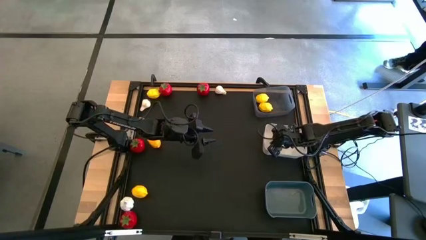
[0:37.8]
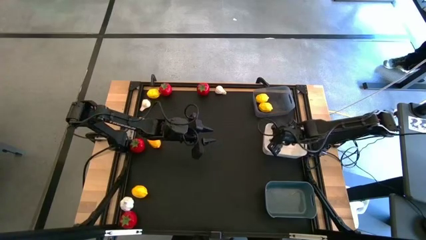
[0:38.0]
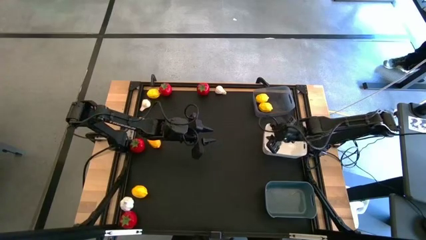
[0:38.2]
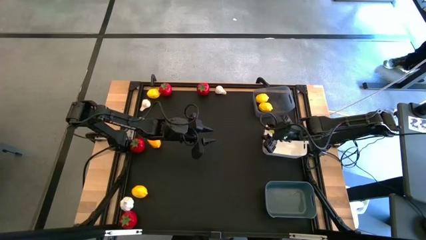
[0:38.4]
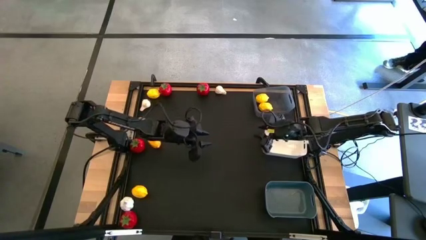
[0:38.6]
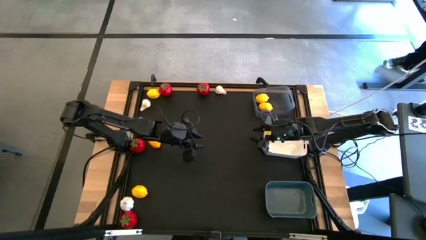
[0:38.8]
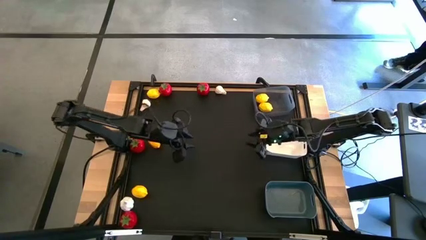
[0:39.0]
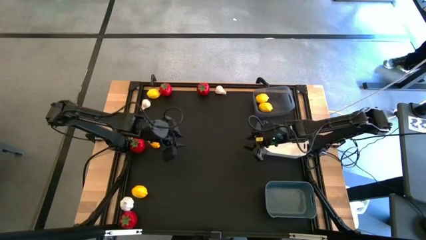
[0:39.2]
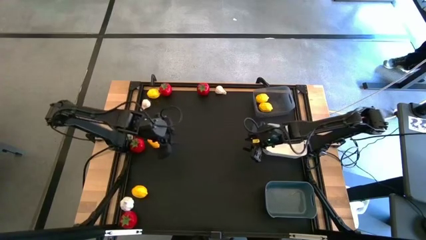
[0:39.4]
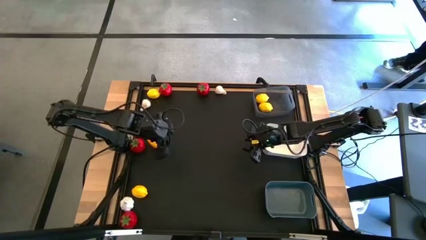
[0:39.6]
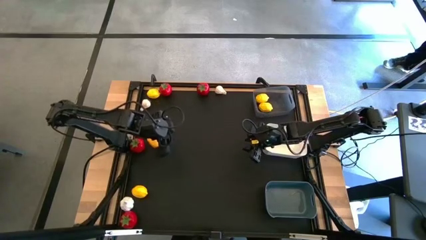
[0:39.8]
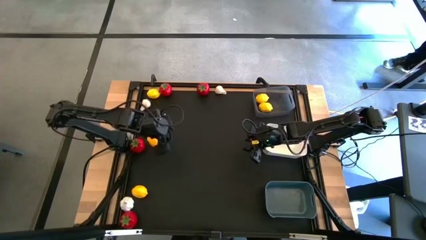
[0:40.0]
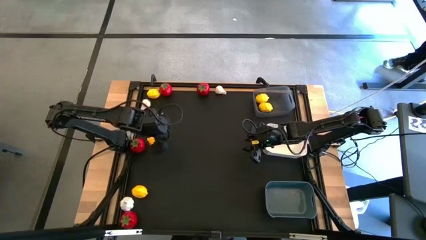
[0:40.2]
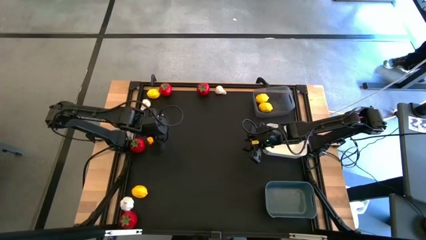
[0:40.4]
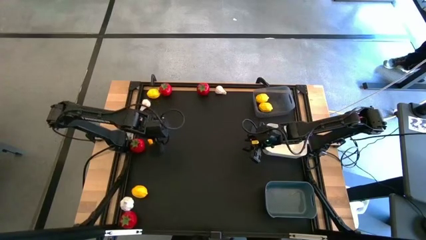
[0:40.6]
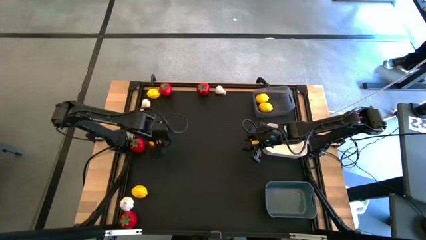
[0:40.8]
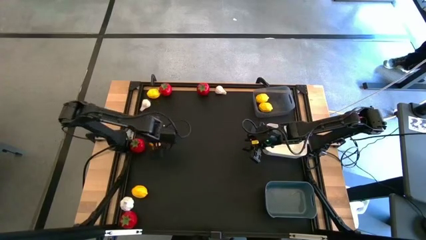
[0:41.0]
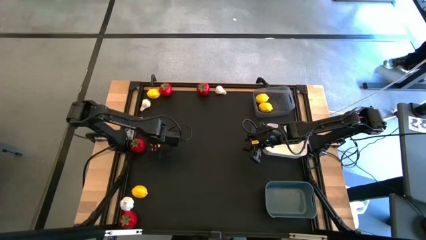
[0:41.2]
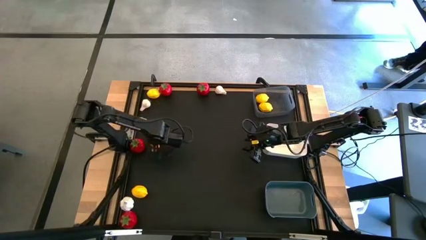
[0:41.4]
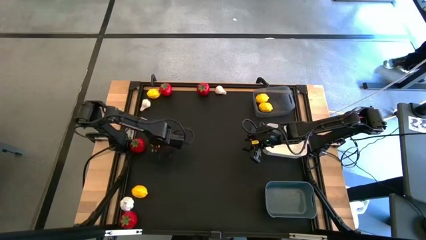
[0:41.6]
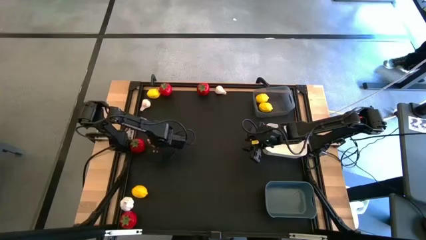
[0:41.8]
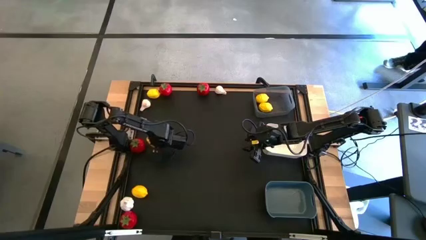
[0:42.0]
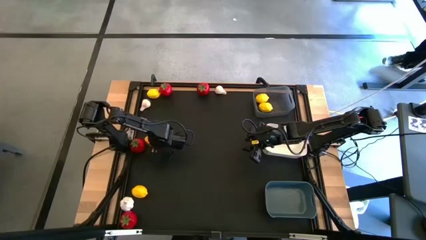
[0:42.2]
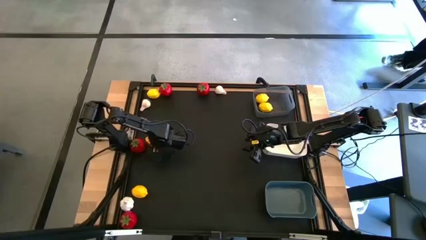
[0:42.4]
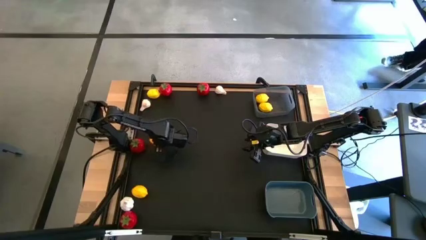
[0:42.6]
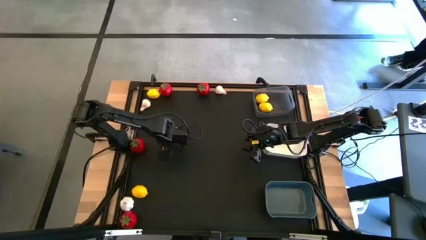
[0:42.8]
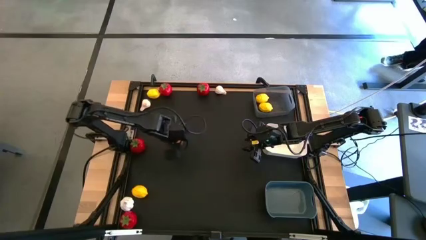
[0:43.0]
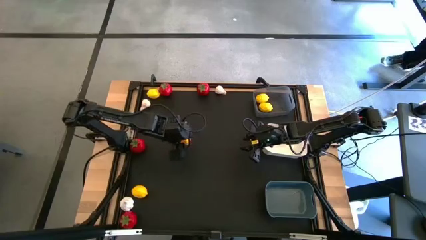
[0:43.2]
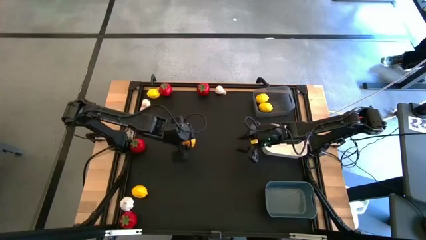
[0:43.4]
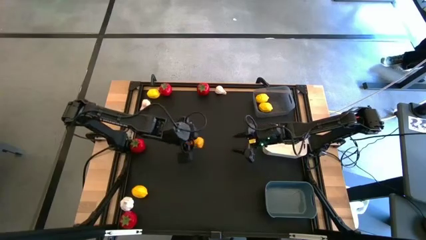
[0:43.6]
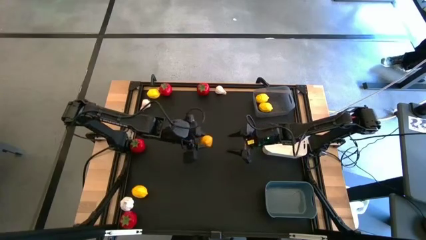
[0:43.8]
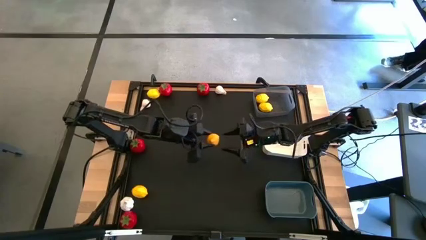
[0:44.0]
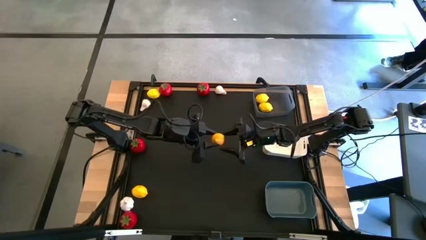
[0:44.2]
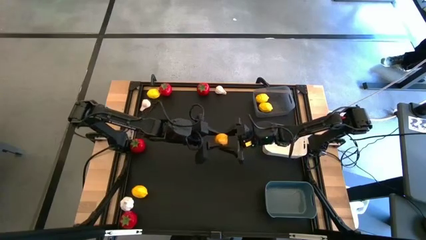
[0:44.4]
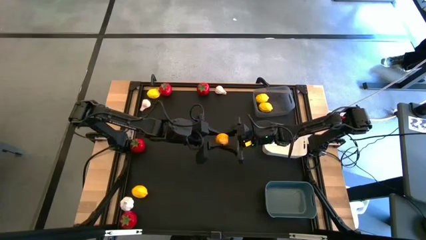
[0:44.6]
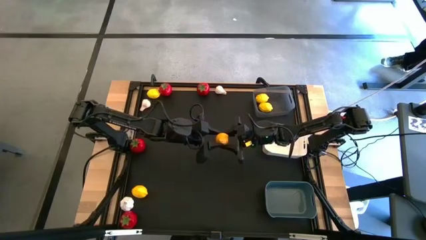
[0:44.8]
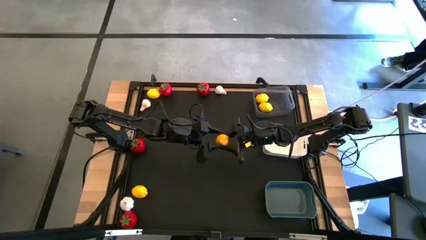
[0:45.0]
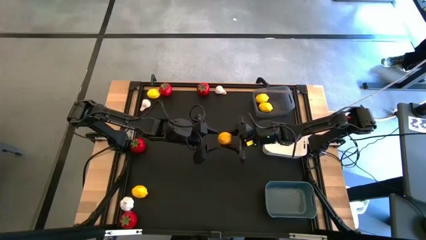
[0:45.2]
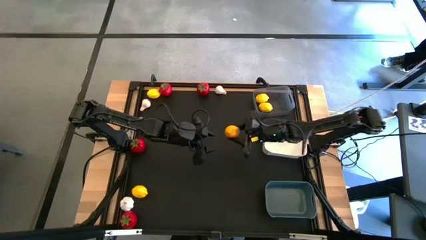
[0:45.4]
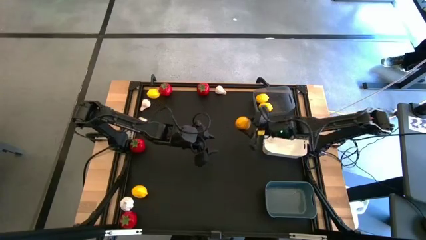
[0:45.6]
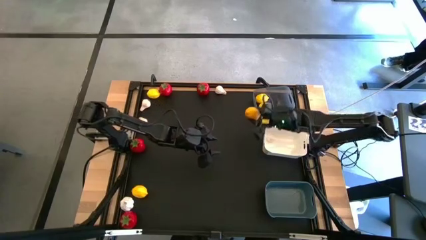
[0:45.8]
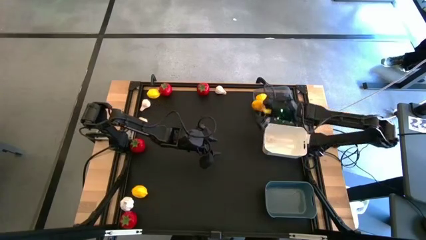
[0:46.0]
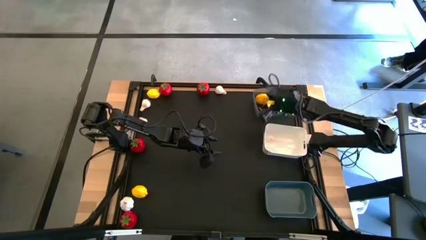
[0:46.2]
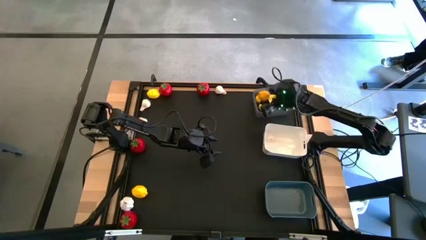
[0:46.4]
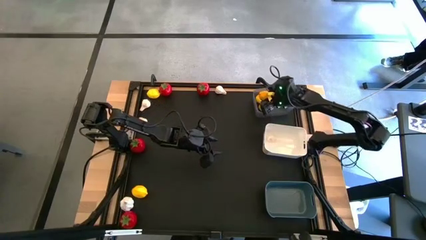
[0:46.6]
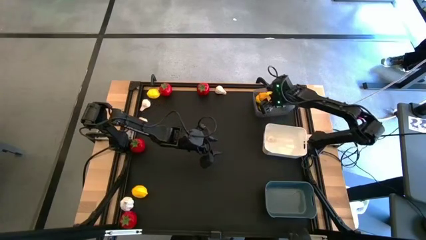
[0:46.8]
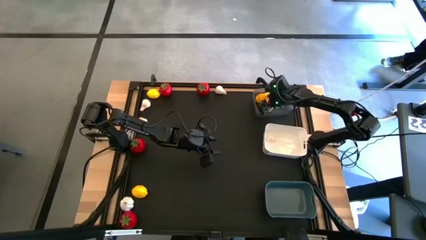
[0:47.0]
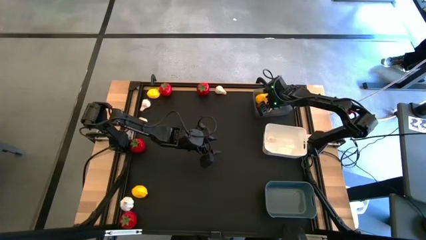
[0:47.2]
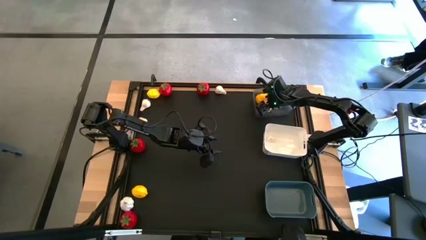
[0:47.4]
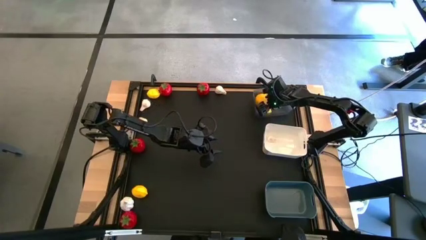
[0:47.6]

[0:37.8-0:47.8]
Task: Sort produce into baskets
Put the lemon into the black bin

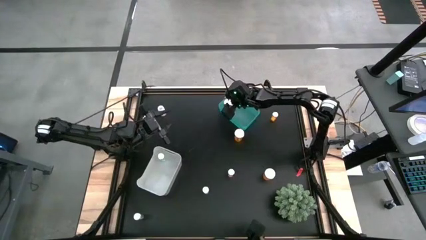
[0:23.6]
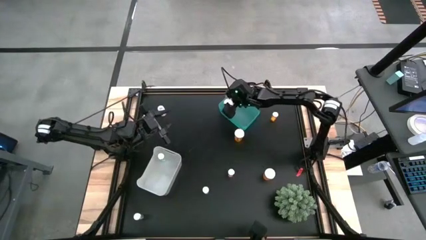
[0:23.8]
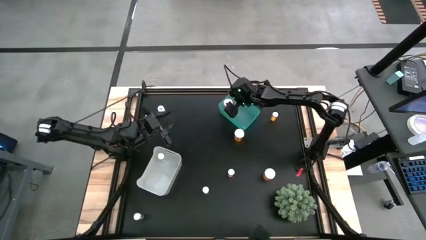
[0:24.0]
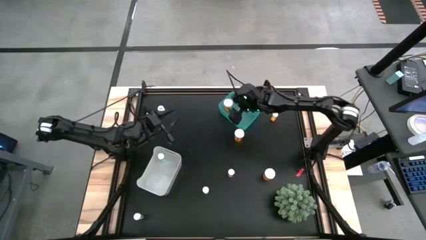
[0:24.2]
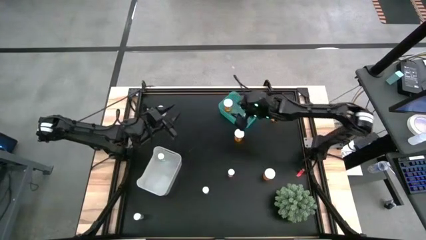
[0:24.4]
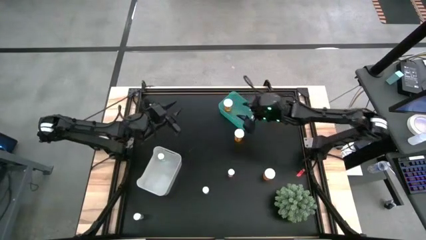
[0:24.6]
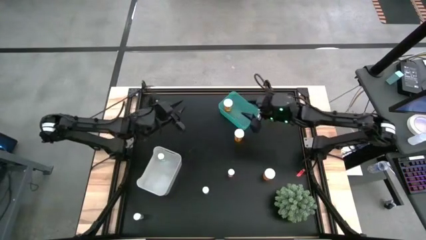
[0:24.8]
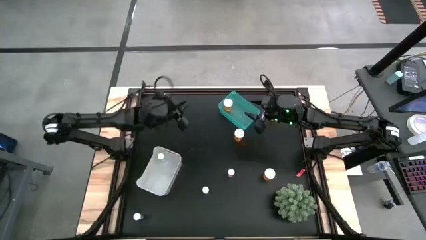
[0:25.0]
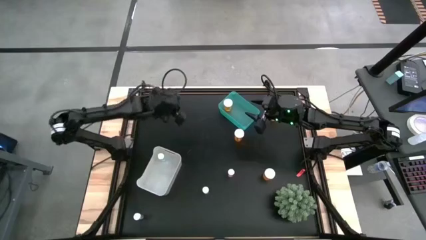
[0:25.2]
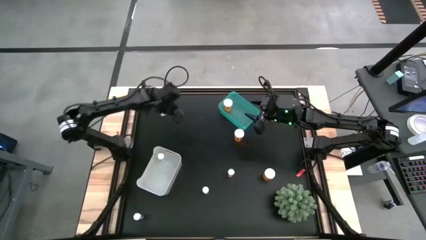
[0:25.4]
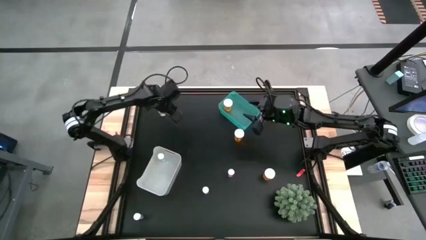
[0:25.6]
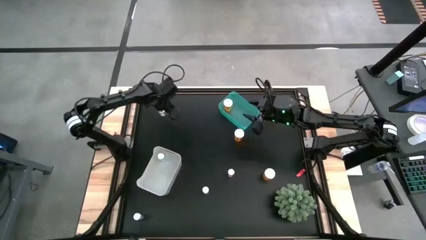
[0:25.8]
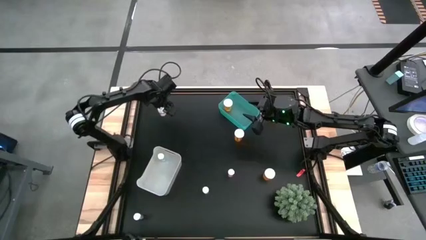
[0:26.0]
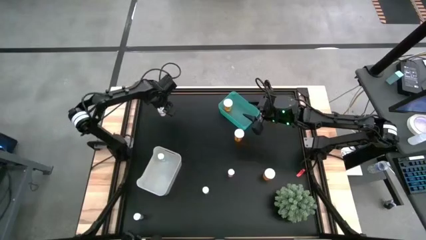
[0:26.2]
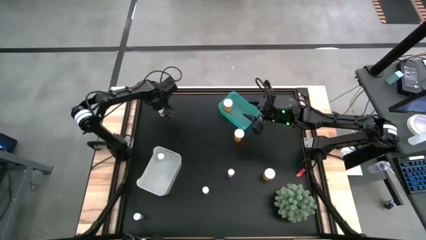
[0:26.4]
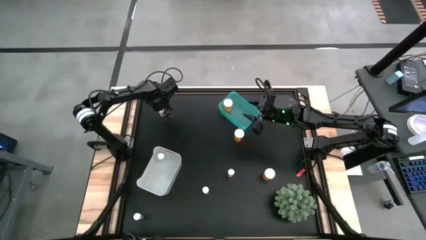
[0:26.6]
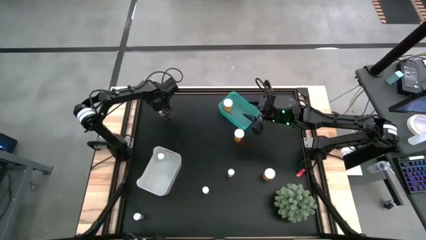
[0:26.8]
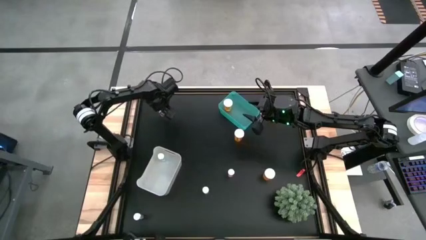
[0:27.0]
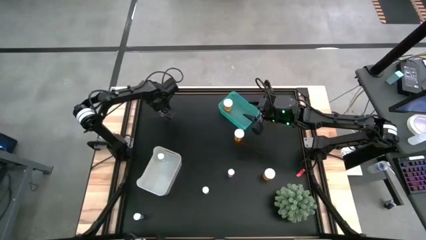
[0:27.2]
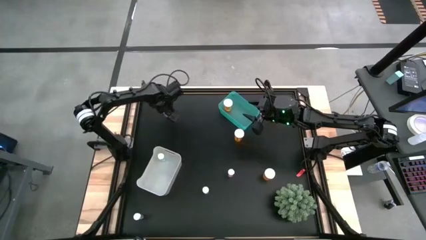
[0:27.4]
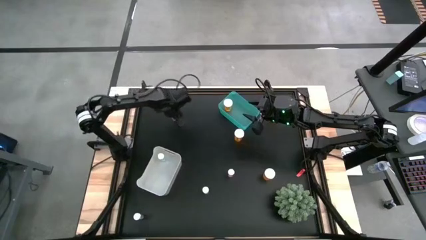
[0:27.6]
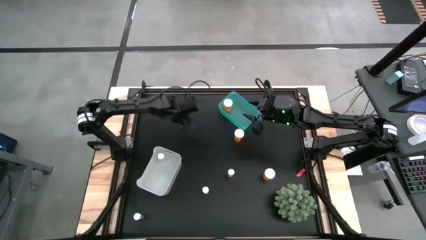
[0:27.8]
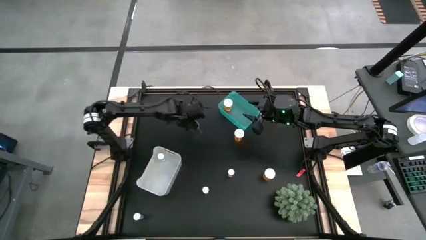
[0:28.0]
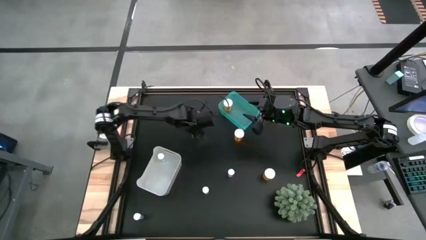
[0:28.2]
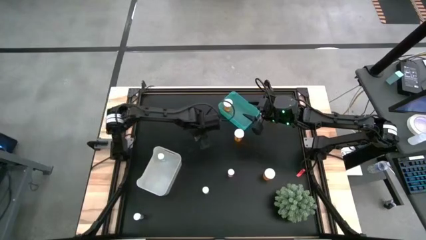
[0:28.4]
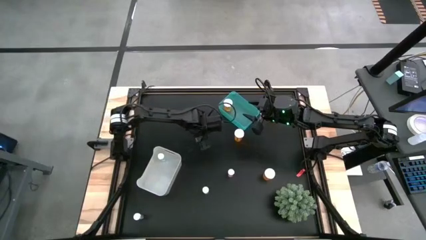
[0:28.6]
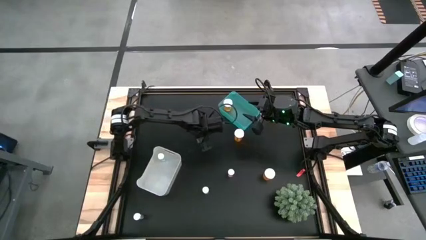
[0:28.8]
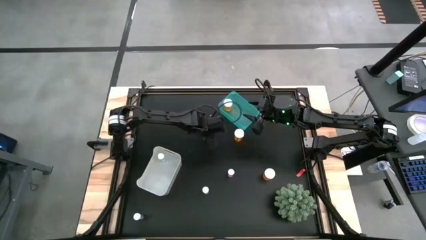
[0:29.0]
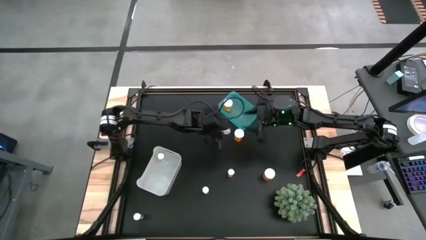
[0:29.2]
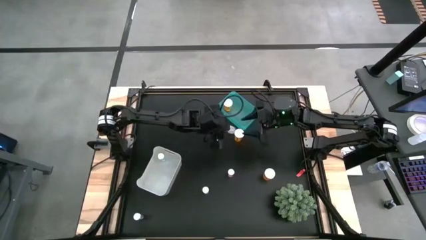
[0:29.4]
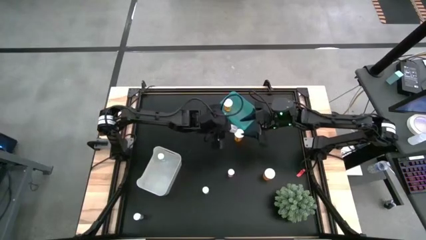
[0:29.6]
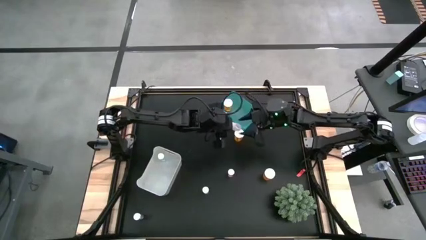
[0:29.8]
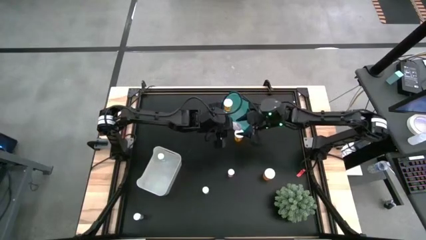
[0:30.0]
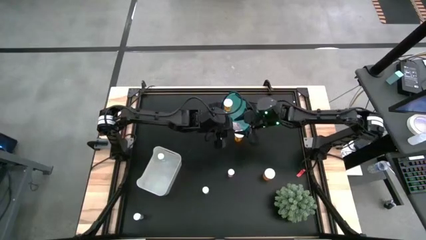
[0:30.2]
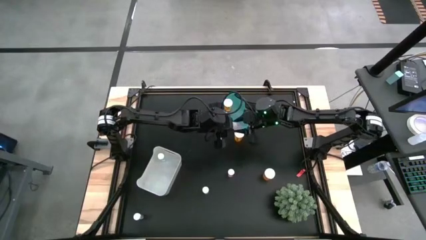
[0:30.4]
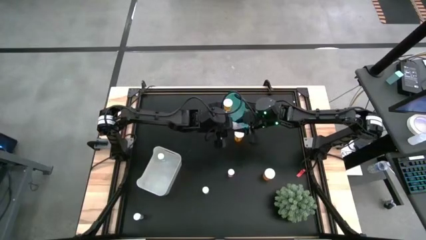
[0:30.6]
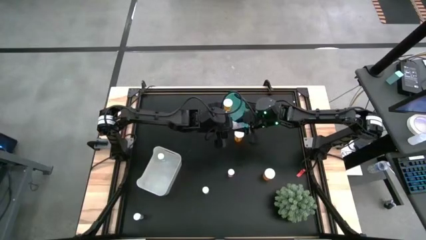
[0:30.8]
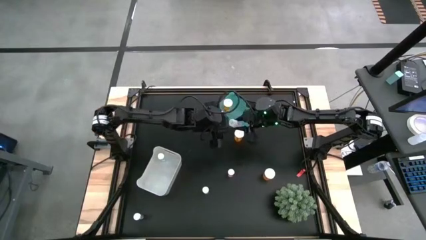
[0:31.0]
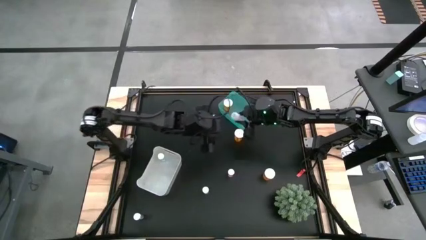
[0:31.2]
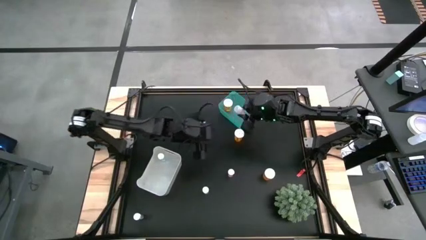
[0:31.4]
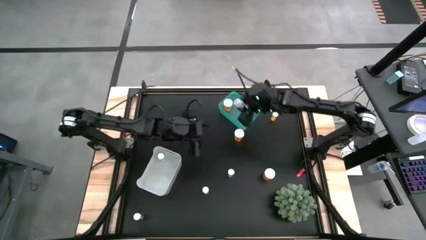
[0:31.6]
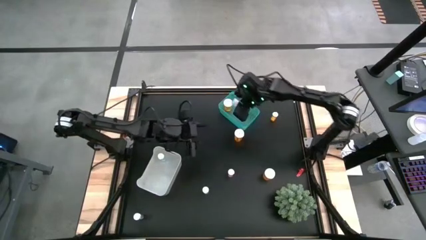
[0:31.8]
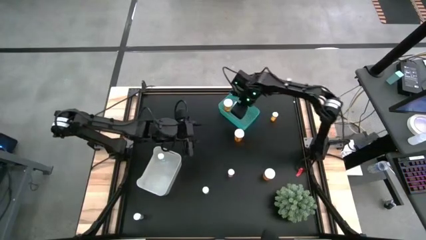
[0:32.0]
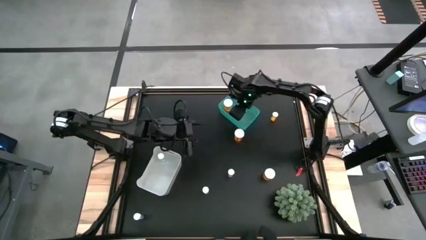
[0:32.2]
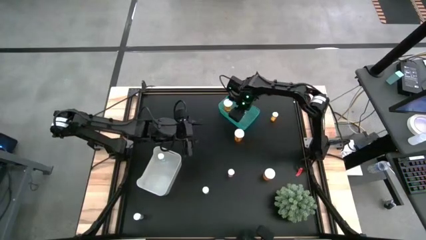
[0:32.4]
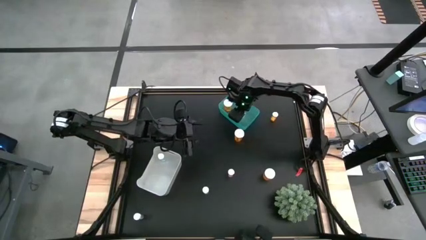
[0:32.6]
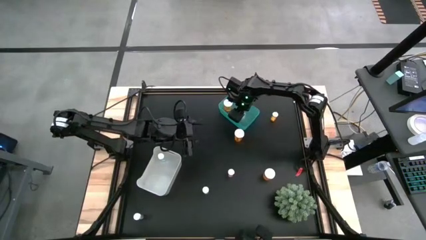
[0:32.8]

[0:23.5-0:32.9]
Task: Pick and place medicine bottles into bin by pill shape (circle, oval)
Put the top transparent capsule bottle into the blue bin
